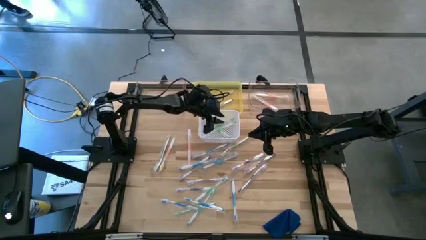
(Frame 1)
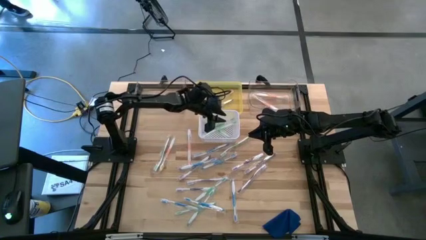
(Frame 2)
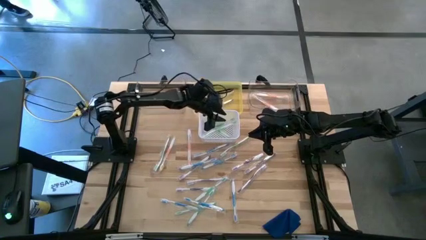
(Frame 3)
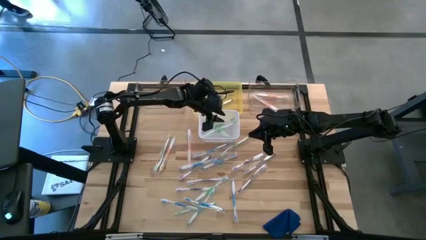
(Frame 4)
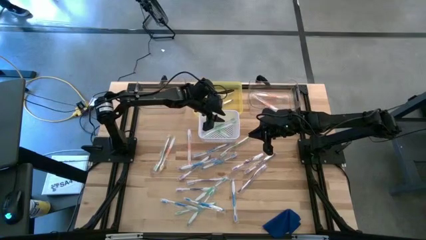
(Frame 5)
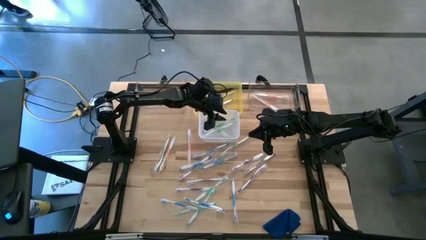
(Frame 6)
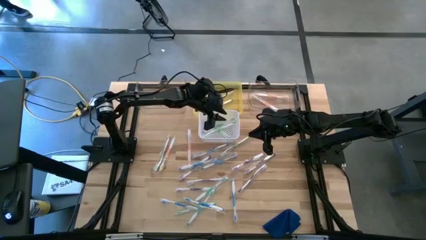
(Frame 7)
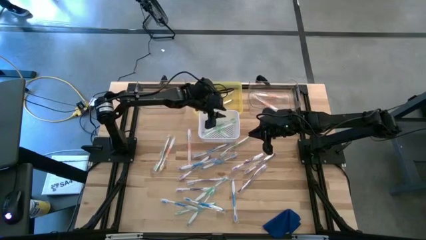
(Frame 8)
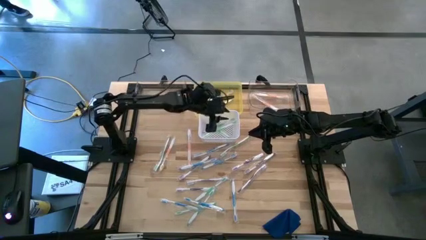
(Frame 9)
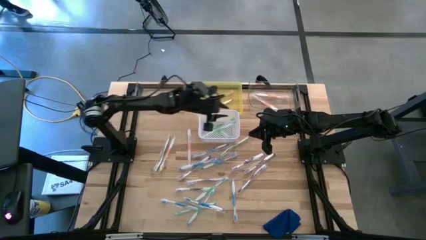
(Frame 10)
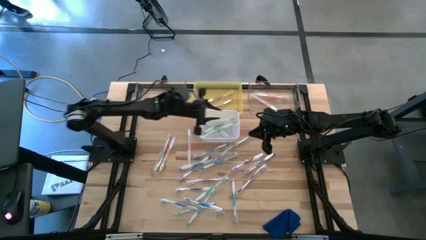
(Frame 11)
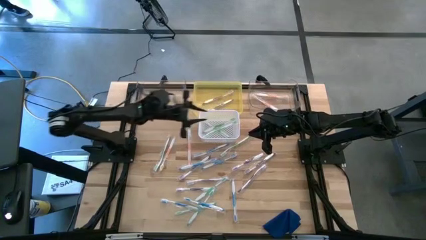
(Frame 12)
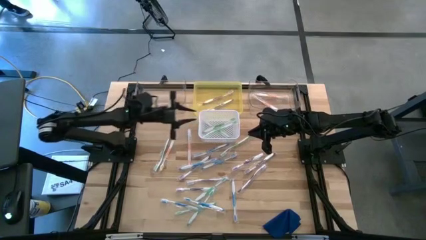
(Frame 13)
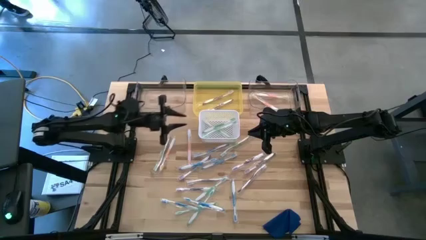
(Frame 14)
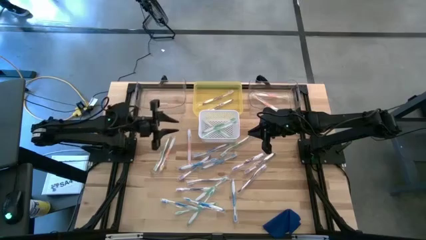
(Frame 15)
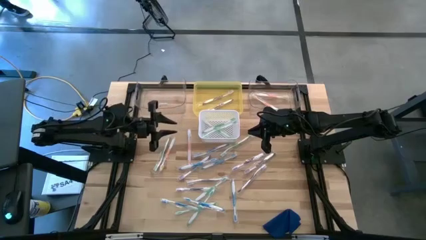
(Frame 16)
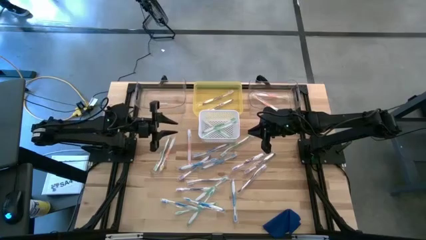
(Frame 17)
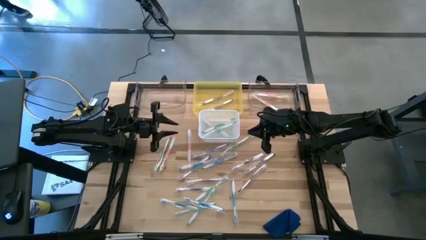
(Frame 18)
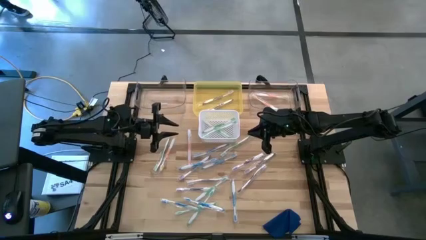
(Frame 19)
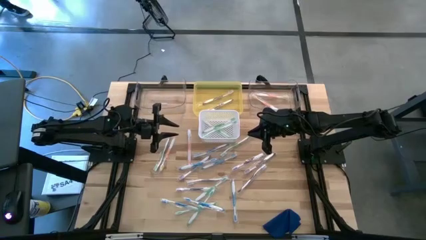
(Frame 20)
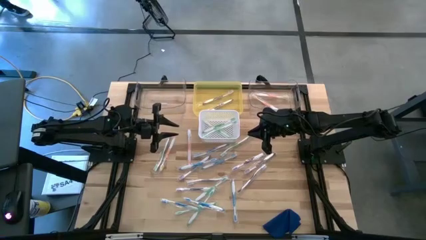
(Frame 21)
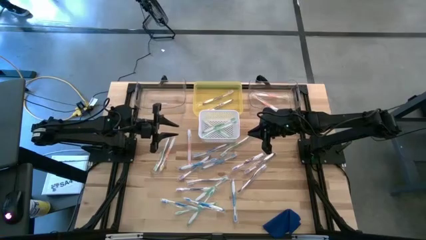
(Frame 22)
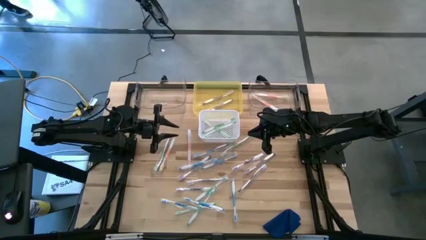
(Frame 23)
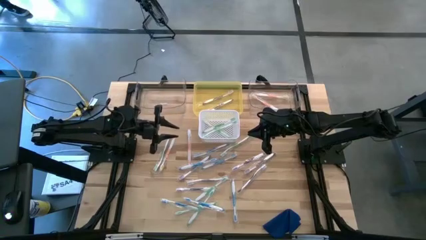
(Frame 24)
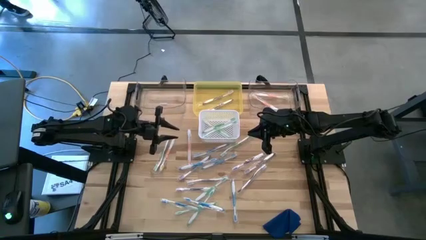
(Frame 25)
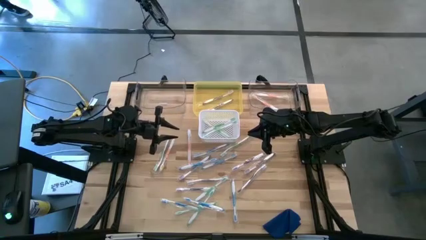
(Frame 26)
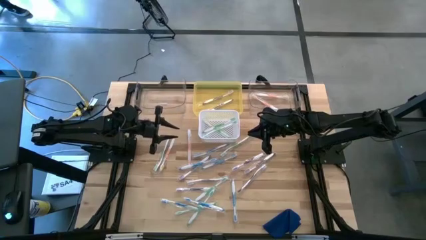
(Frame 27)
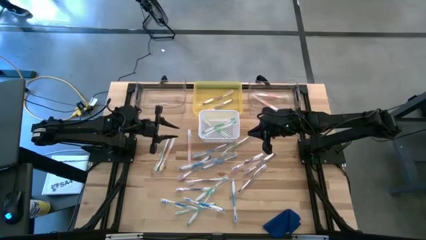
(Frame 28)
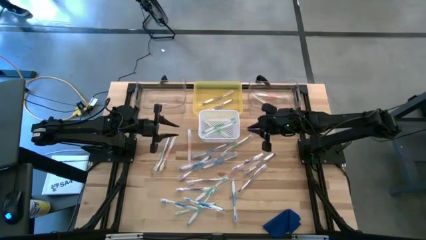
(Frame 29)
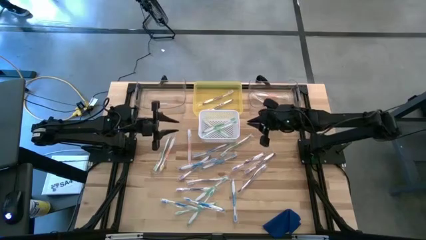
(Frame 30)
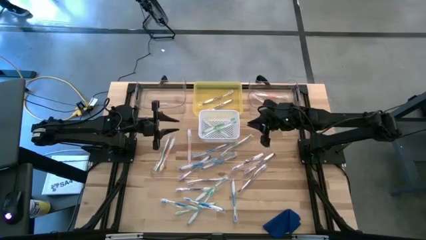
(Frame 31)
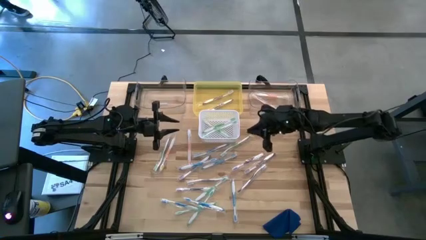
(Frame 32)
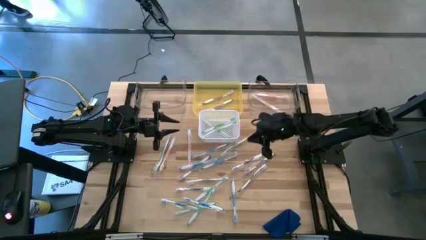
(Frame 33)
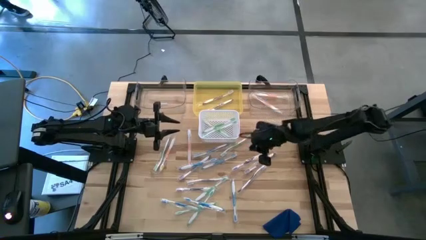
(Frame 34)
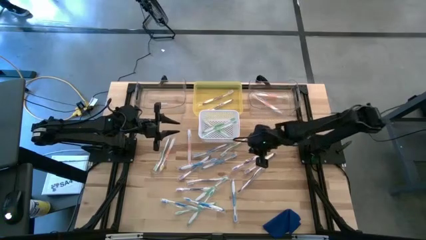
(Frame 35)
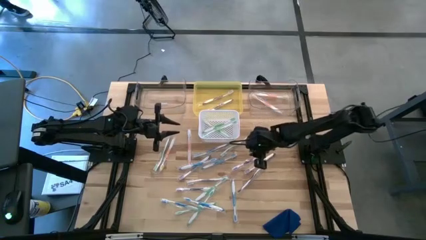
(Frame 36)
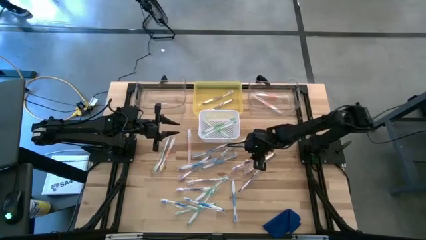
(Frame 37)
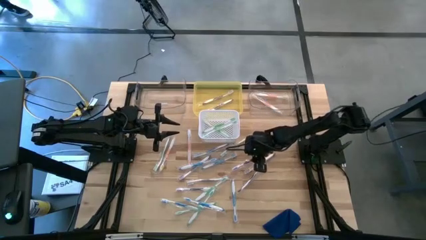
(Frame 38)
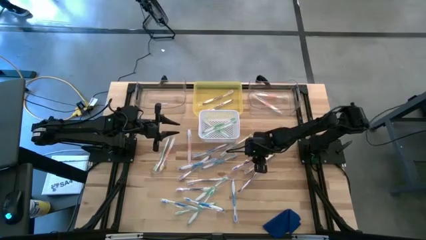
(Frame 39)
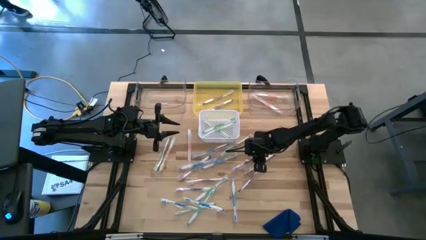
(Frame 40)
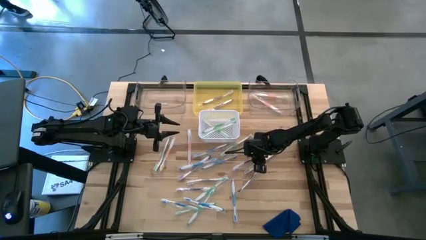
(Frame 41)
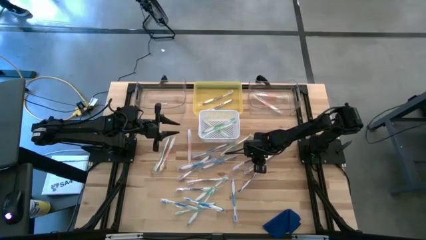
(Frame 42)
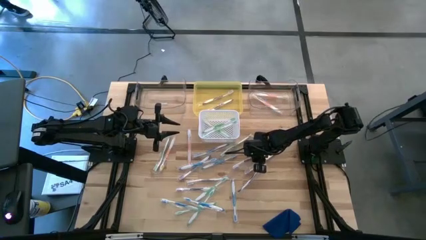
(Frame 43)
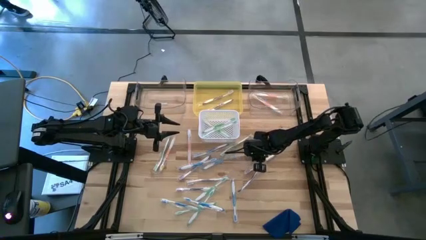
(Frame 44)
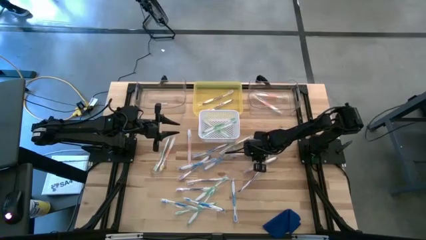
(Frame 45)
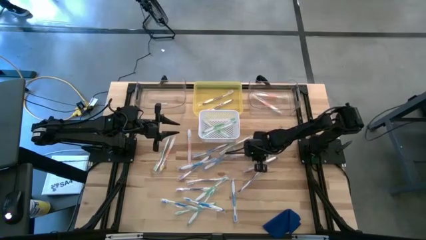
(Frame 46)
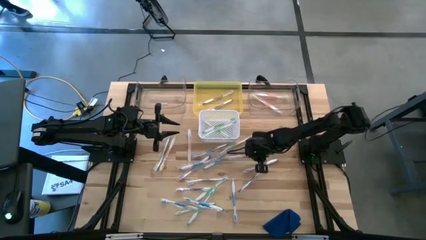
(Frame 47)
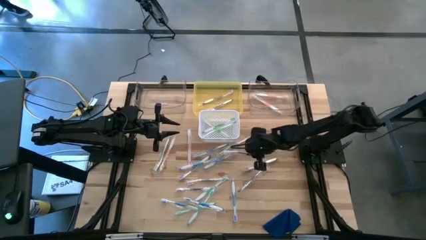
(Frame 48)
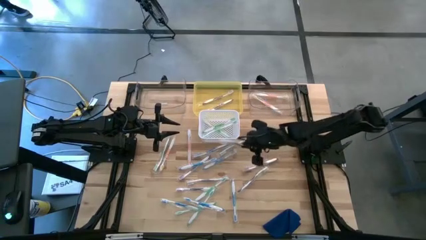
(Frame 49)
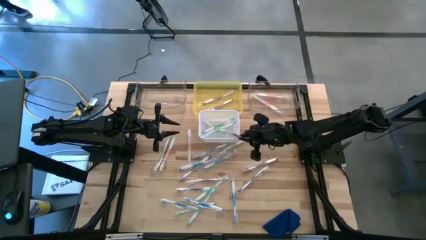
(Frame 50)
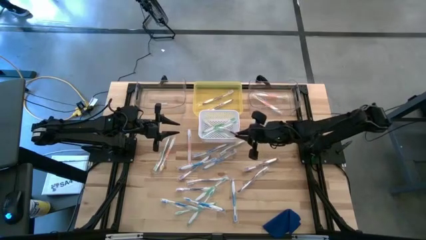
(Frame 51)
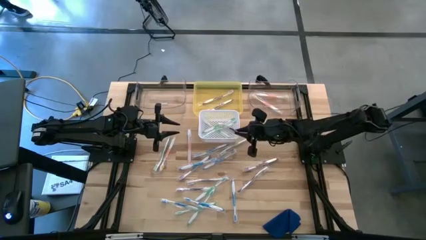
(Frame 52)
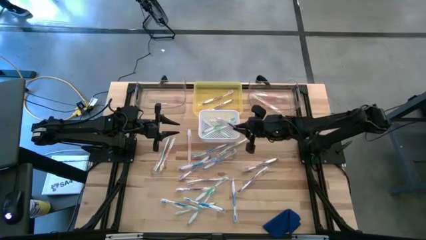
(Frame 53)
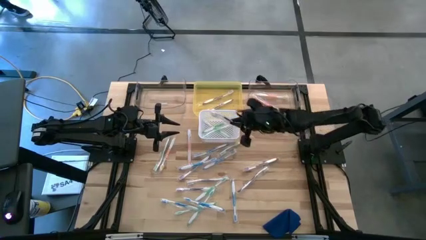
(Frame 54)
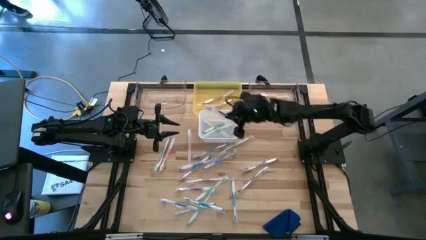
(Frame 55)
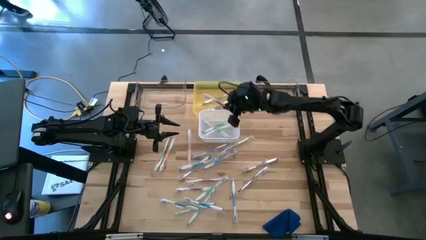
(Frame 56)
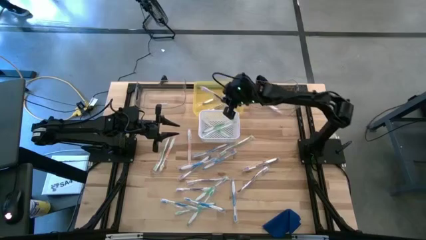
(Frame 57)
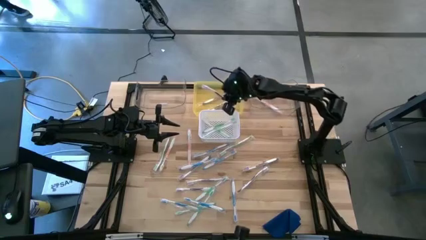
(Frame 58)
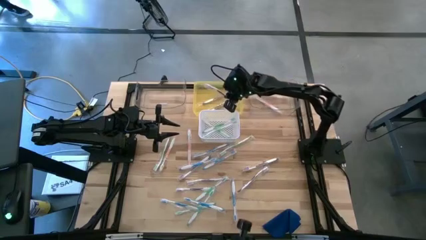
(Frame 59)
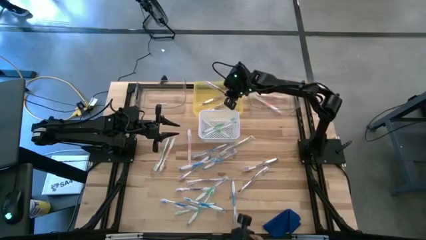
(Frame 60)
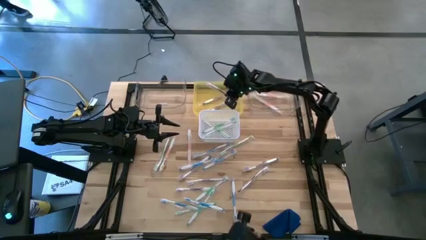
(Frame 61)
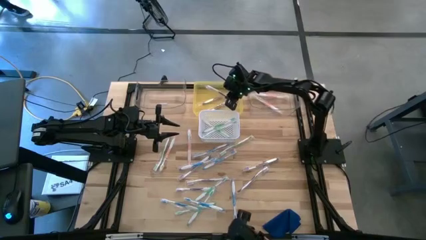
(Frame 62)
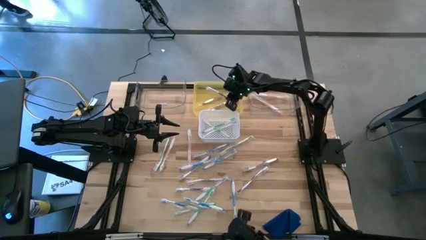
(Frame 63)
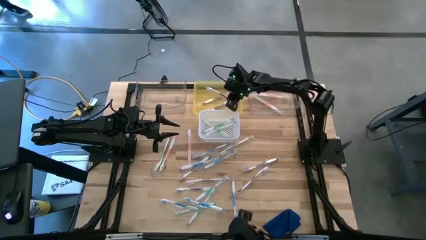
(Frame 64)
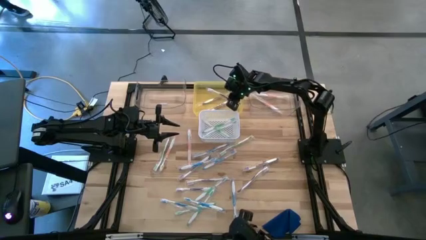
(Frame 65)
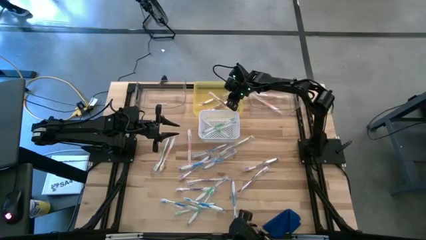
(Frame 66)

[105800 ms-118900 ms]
Task: Pick & Place Toothbrushes
Put the purple toothbrush into the yellow bin
